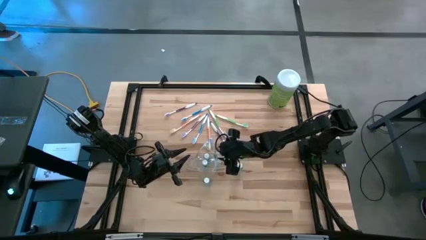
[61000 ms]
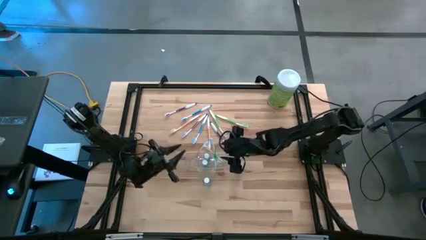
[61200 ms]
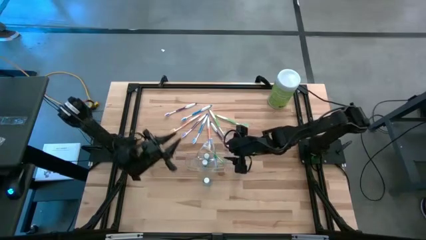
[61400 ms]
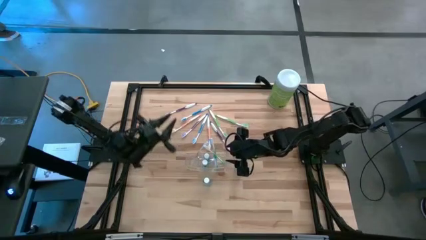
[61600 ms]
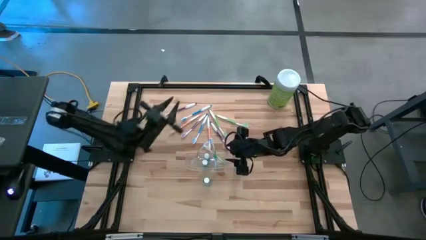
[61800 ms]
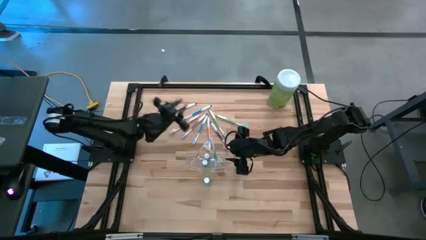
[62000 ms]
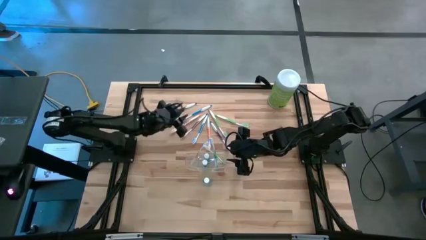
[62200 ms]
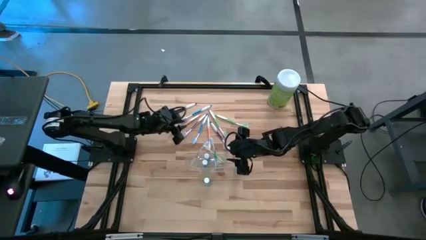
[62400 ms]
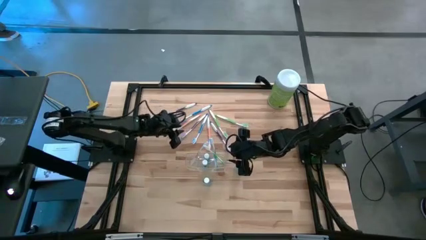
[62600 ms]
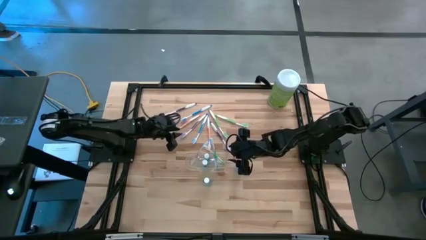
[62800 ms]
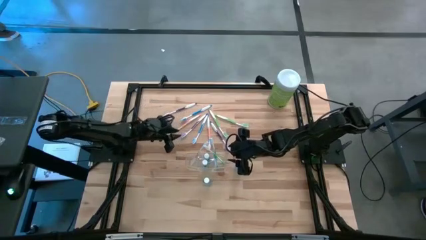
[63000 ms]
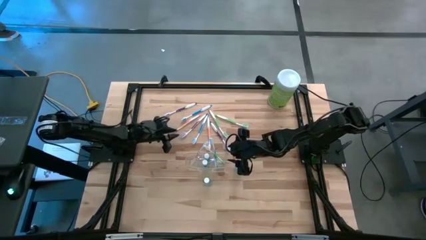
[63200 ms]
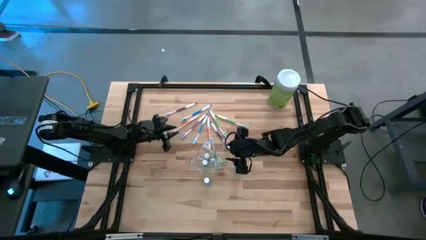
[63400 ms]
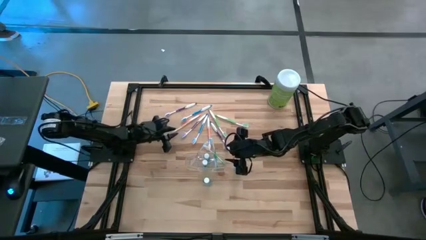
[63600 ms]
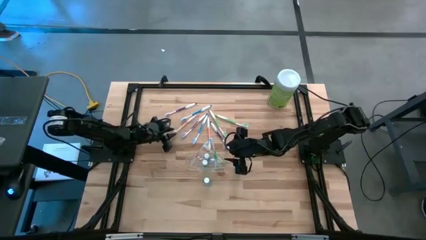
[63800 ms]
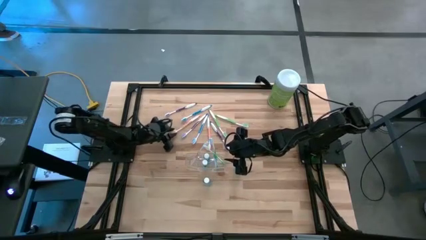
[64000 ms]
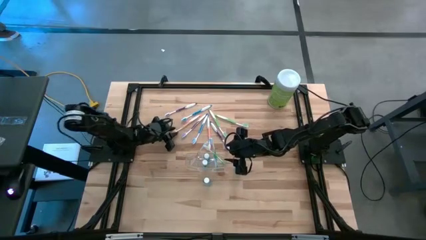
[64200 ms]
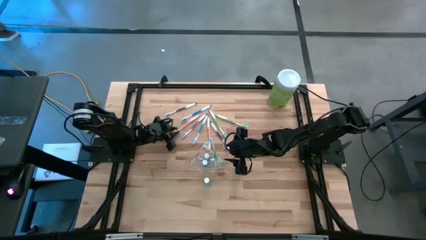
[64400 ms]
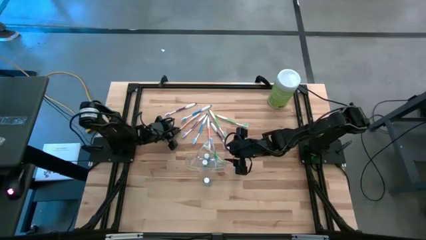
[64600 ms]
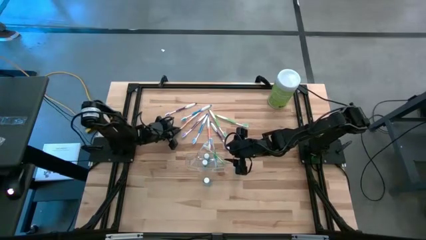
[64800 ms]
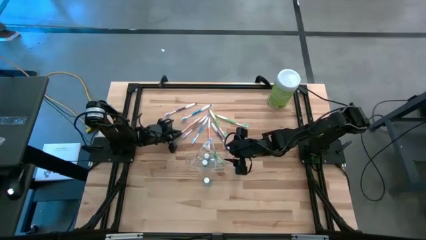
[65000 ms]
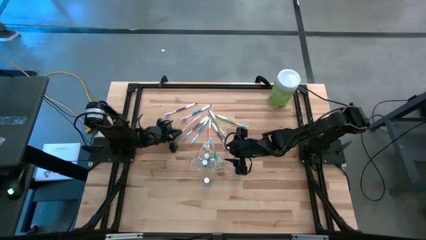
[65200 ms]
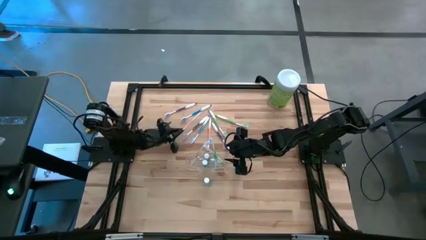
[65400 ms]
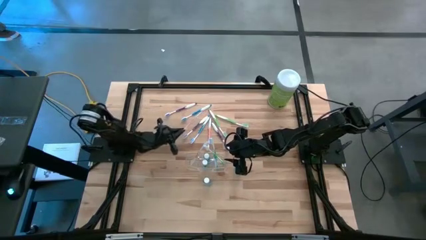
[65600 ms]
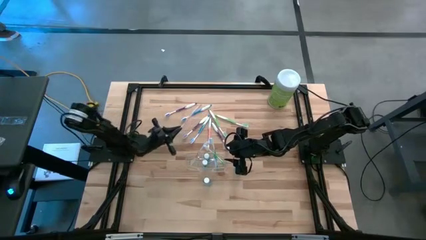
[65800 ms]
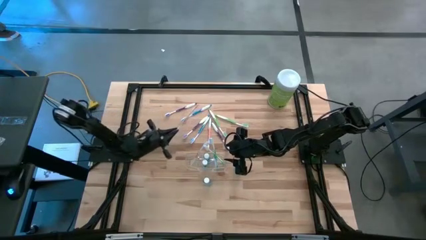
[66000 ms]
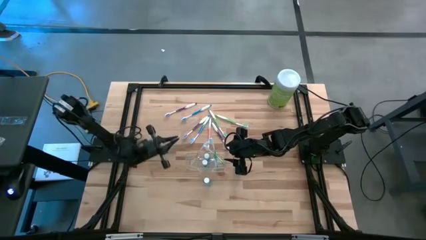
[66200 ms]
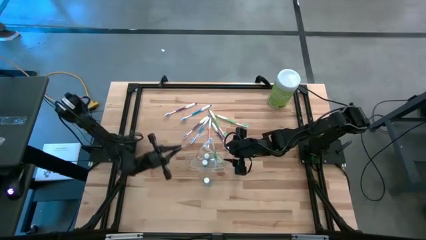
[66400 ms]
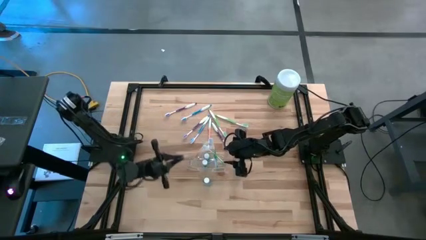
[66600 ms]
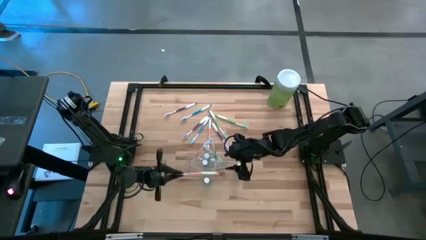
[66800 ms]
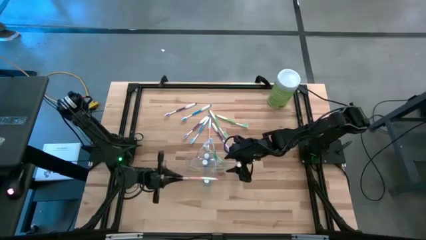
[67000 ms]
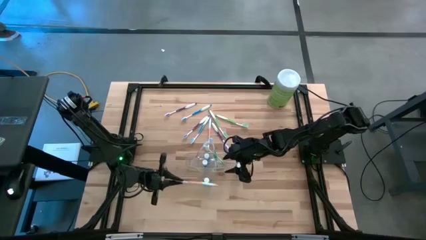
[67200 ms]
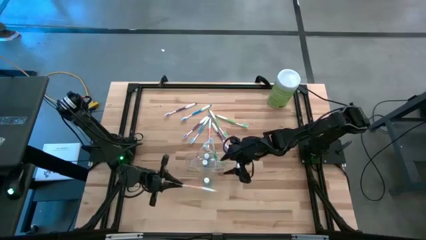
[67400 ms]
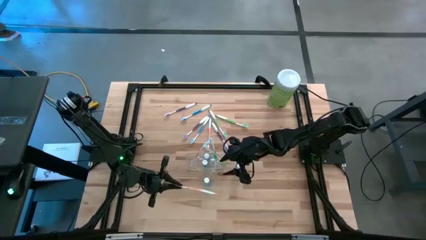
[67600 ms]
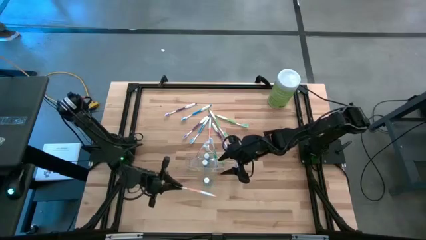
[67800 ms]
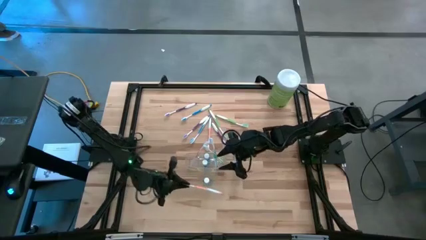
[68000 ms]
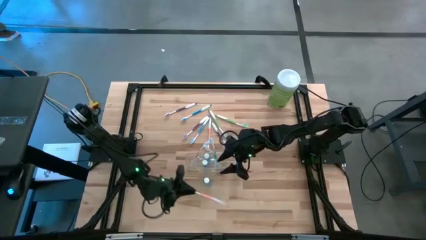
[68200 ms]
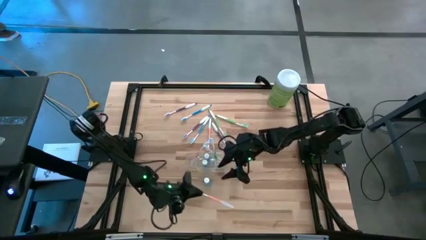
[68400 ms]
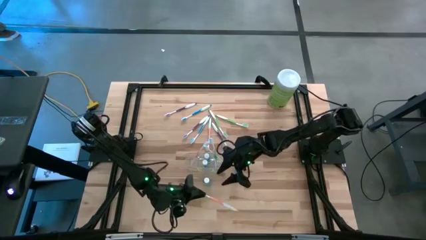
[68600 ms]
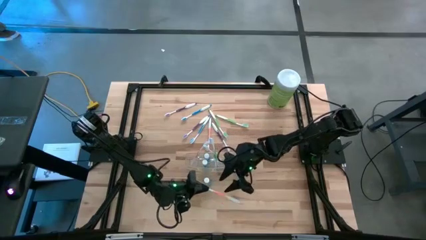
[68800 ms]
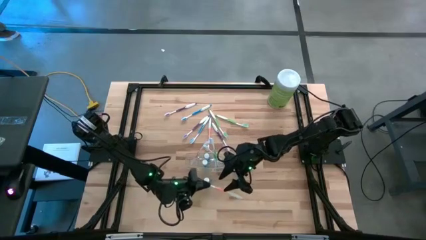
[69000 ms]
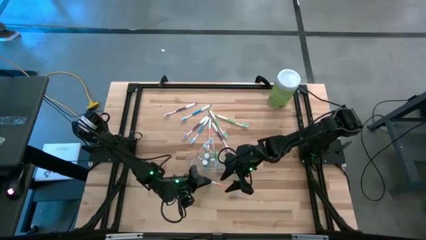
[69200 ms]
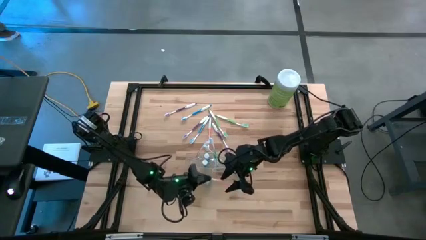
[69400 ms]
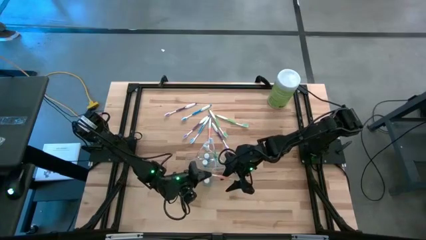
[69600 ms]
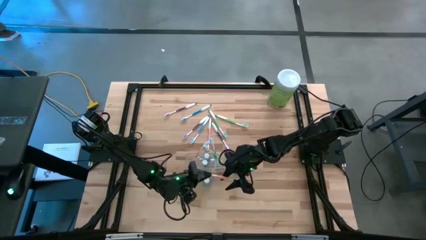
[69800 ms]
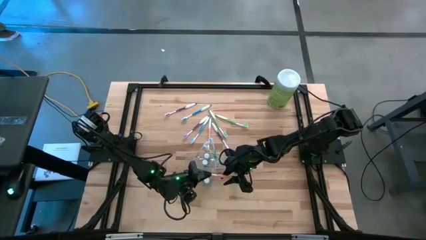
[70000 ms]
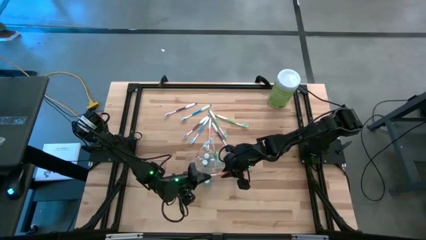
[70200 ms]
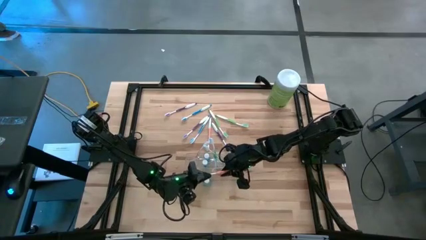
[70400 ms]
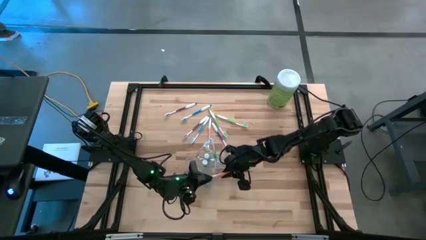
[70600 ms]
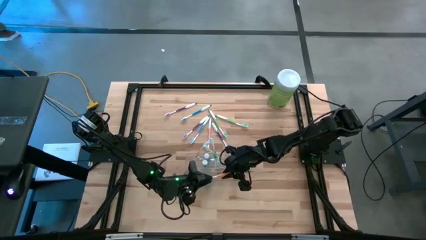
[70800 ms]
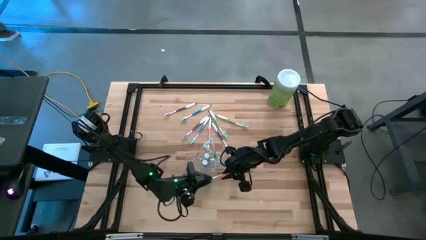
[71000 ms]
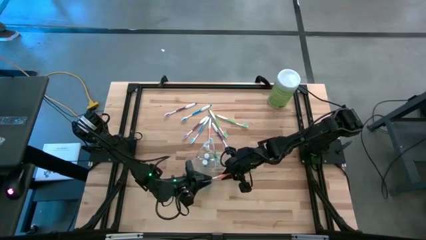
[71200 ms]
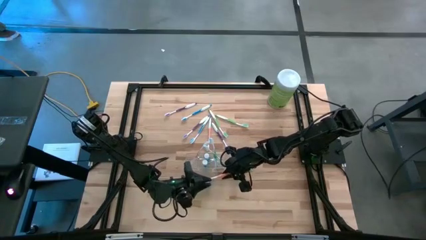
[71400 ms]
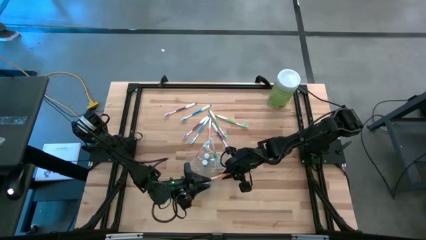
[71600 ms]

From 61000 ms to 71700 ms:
Task: Pick & Place toothbrushing station
Put the orange toothbrush into the transparent organizer
